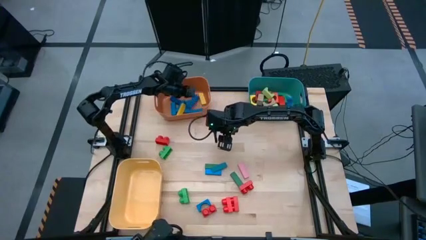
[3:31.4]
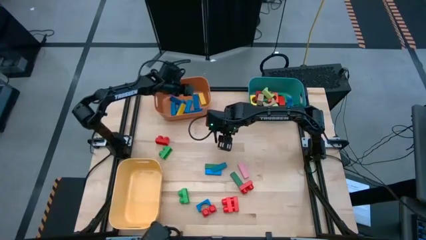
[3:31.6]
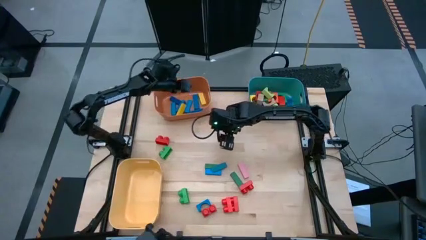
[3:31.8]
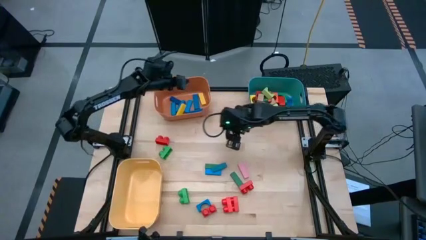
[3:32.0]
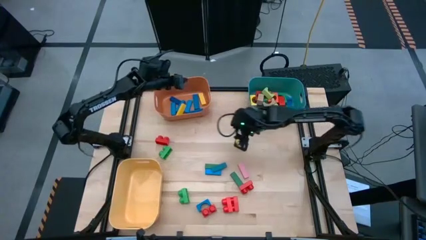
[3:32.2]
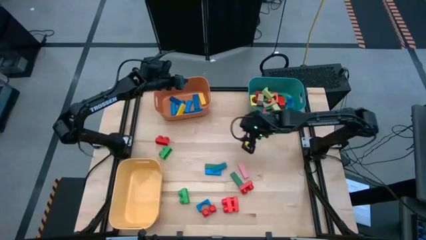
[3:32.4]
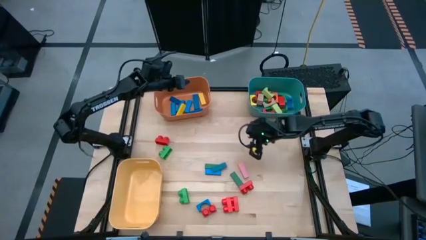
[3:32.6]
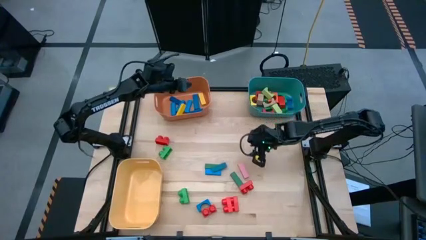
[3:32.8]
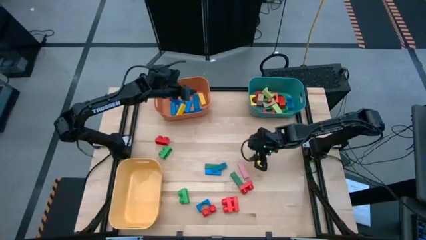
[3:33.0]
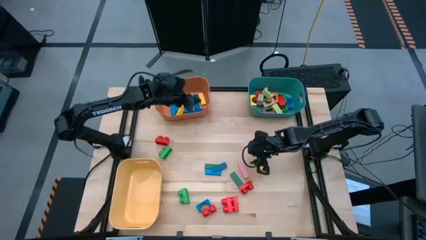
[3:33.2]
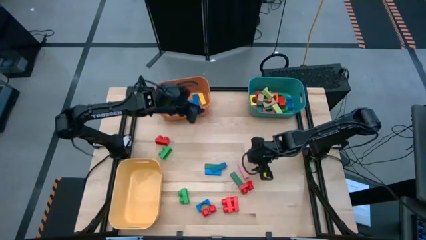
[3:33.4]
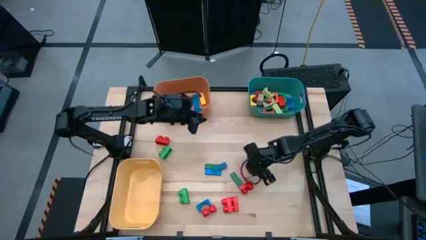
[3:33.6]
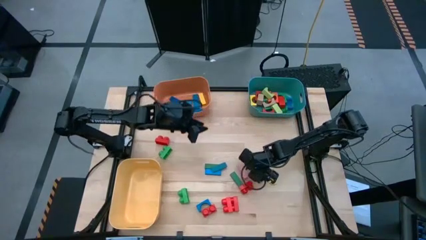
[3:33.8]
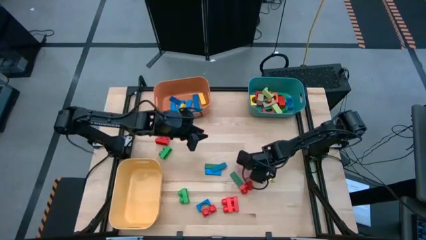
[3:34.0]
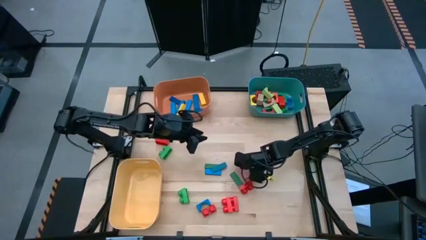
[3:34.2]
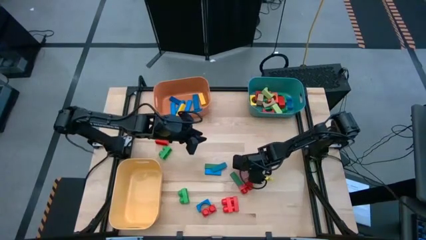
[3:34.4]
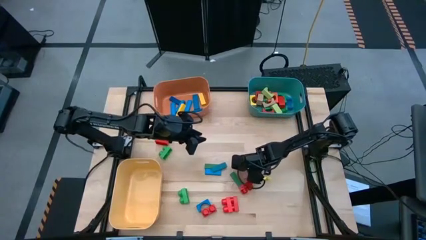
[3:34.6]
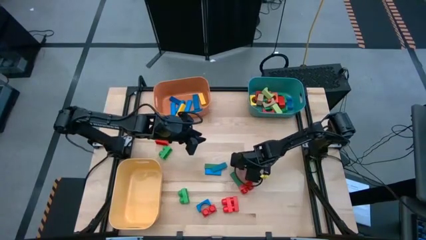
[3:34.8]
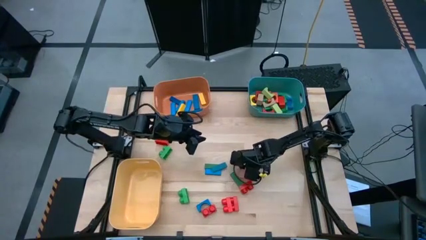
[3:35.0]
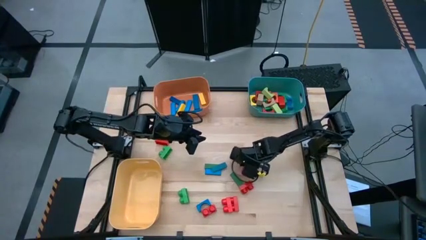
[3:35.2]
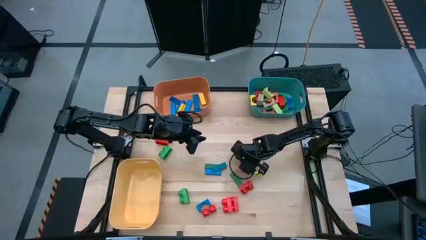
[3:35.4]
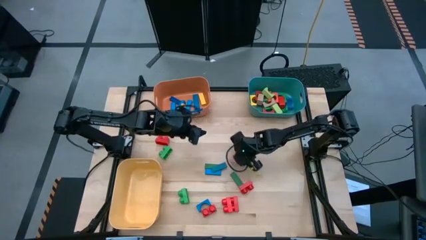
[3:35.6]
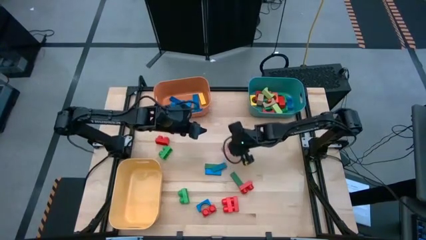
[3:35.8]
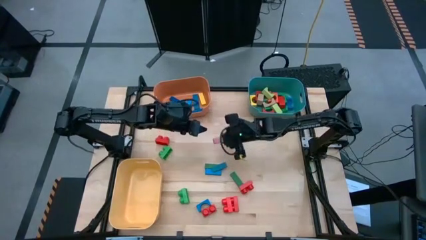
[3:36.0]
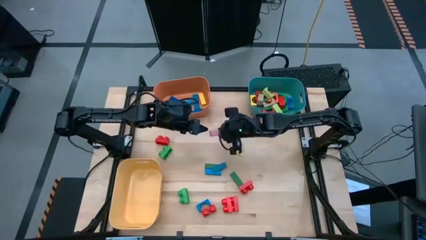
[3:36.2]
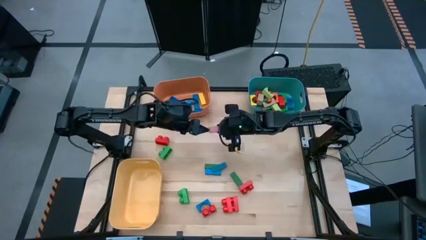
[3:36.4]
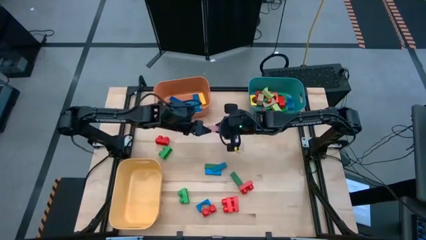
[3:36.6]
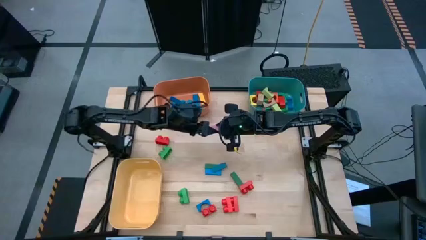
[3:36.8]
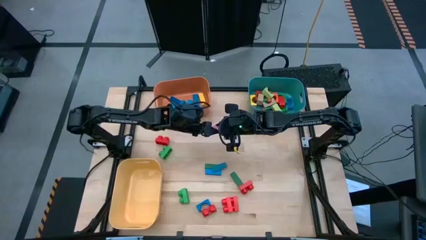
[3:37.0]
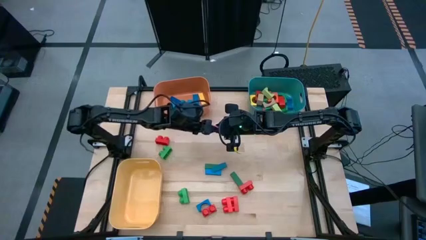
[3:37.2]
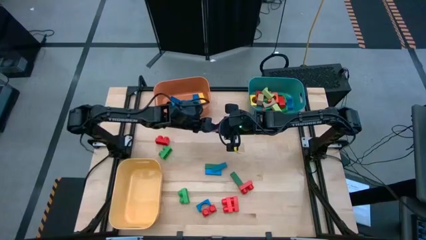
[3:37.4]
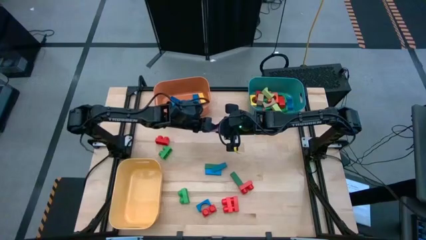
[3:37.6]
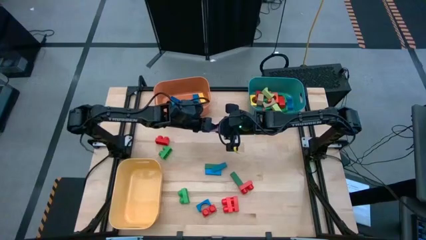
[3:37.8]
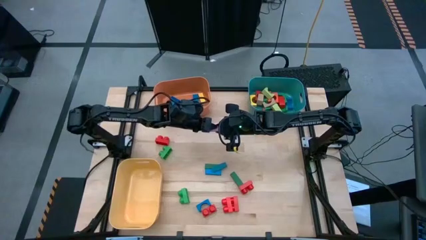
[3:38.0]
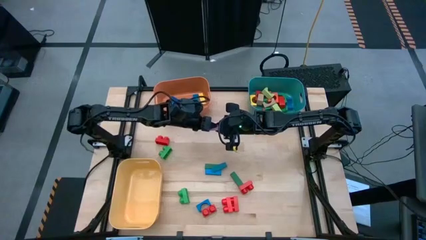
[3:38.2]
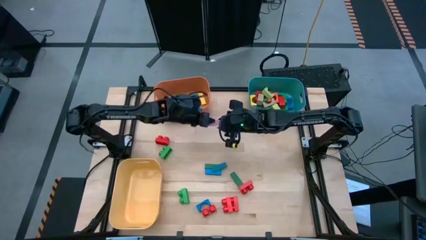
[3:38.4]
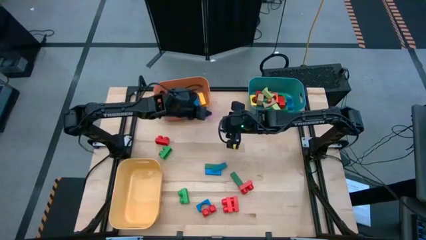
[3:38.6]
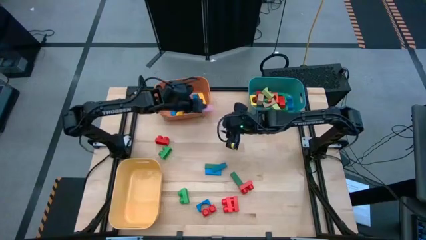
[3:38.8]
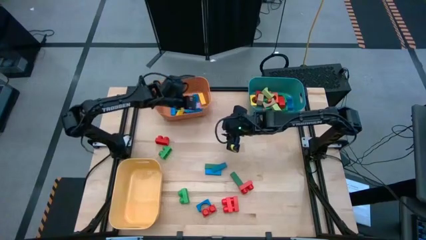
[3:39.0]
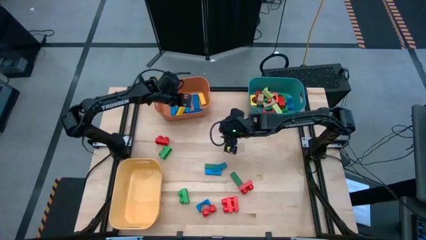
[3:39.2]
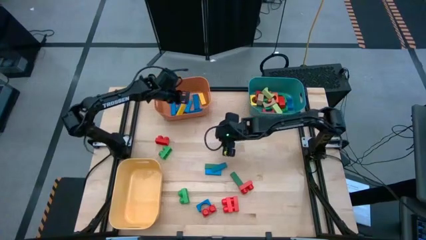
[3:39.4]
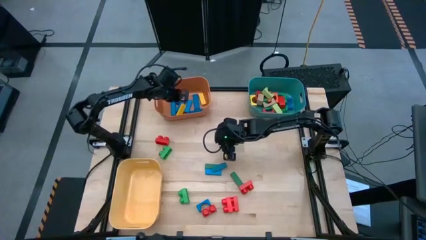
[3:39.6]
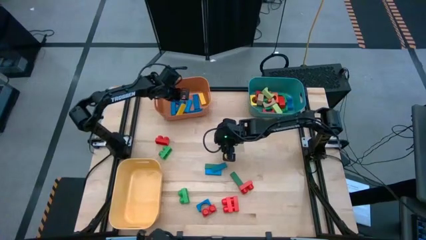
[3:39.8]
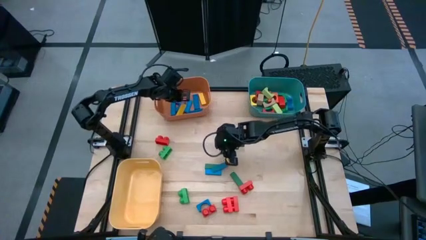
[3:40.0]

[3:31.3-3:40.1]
Task: Sort blocks by size
Put the pink rectangular block into the orange bin

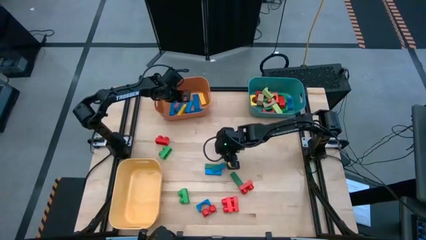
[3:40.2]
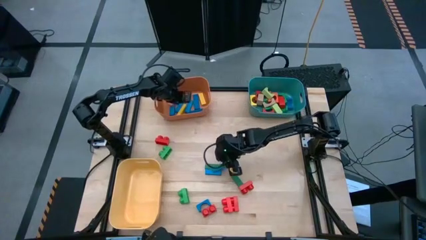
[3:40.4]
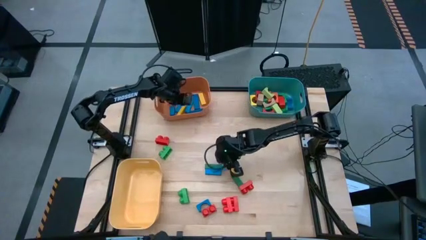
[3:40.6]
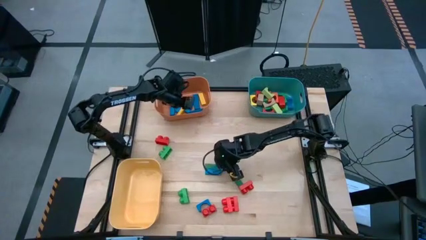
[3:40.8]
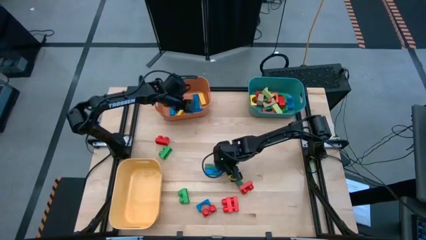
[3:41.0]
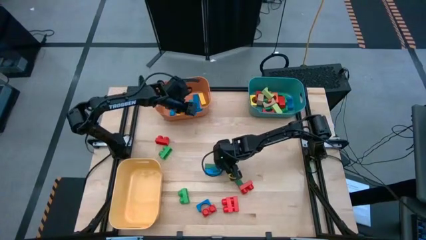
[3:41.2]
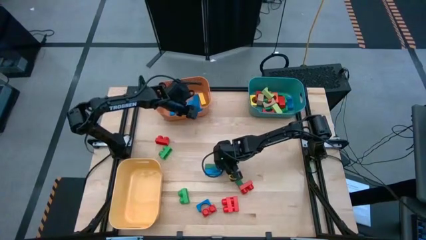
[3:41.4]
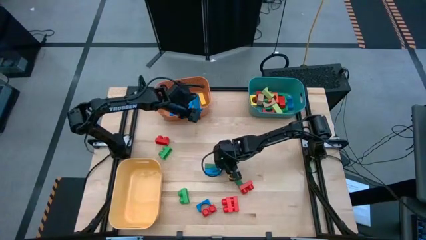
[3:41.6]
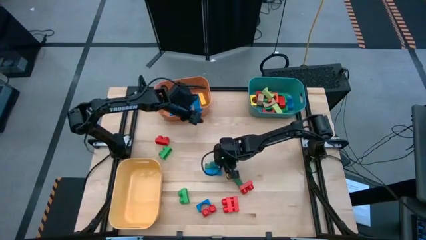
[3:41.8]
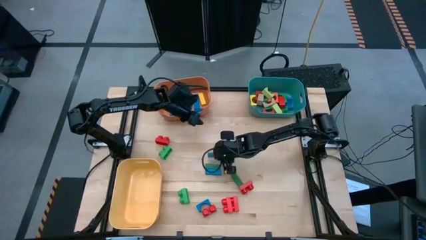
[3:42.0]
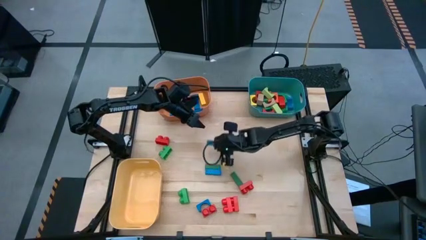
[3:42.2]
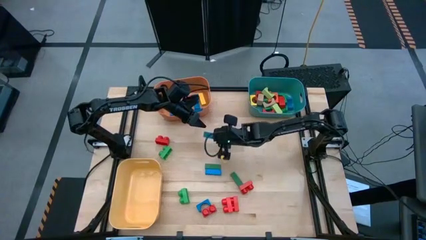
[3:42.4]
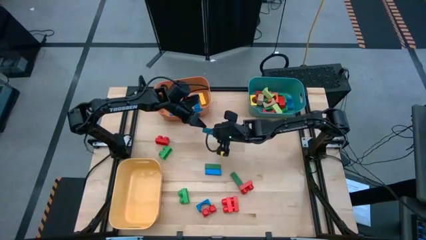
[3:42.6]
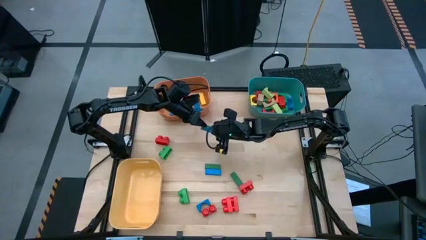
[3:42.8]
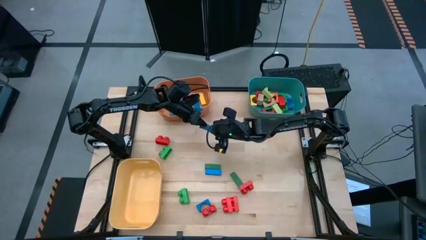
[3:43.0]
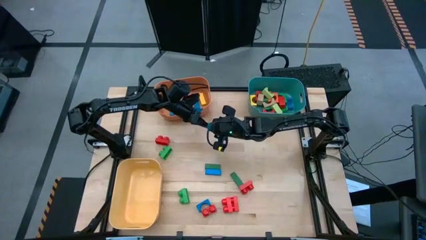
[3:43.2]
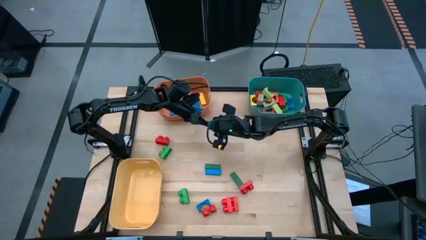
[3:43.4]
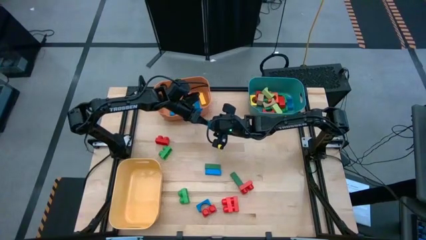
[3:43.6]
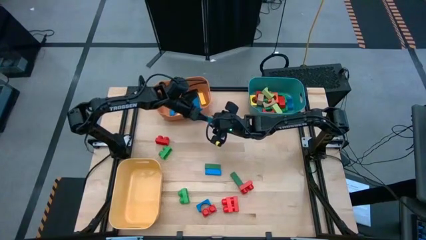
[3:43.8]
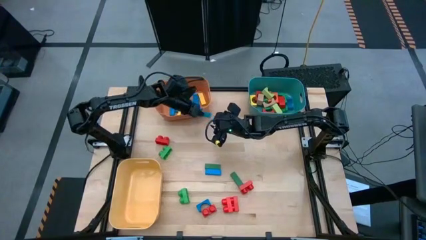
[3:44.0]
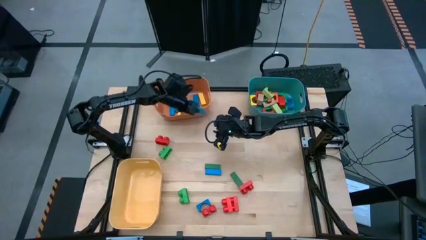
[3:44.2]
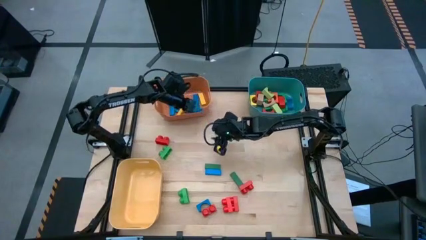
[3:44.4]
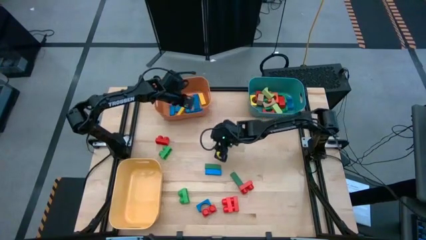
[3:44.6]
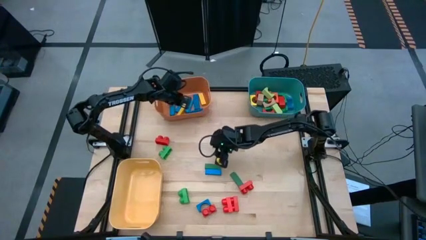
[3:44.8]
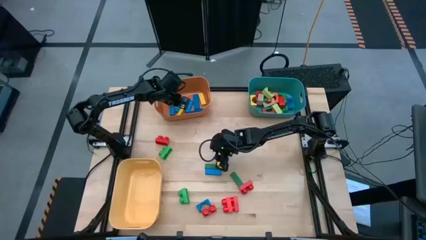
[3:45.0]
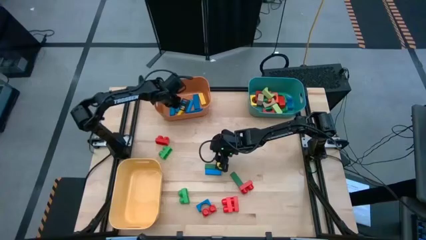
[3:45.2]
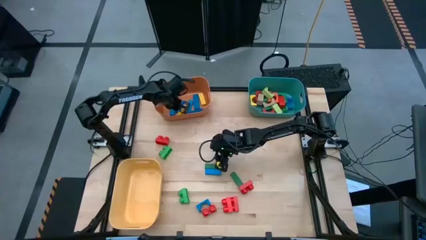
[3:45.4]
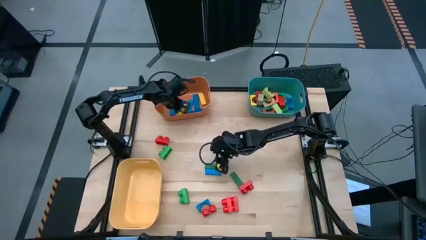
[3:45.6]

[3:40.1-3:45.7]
Put the blue rectangular block into the orange bin

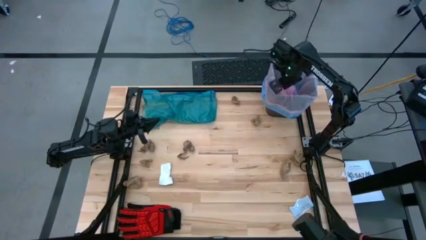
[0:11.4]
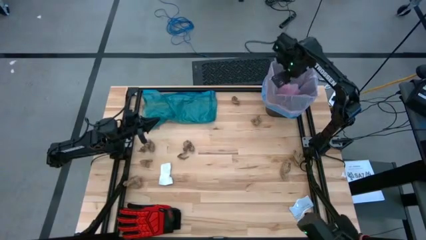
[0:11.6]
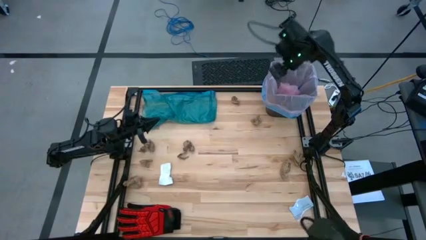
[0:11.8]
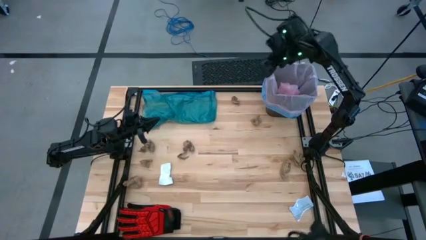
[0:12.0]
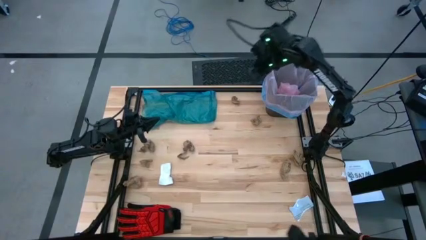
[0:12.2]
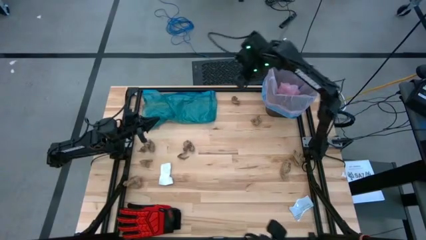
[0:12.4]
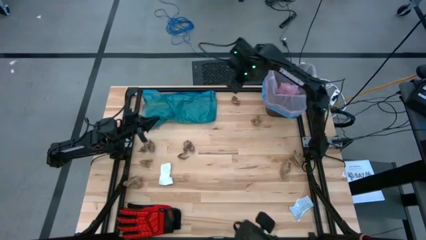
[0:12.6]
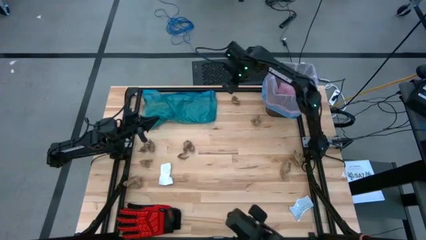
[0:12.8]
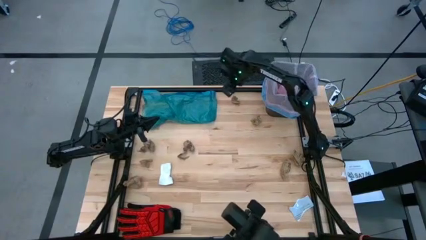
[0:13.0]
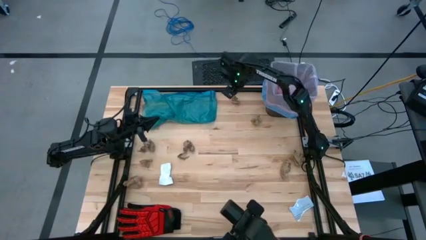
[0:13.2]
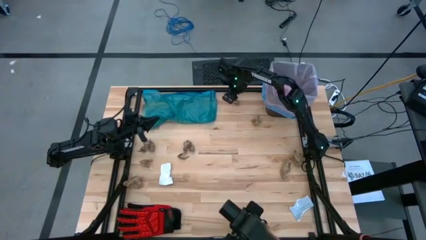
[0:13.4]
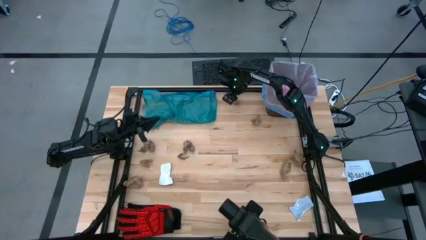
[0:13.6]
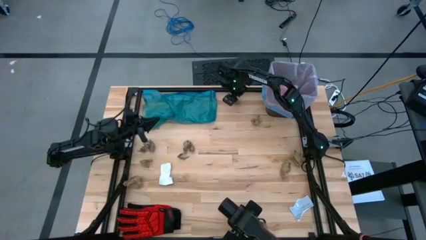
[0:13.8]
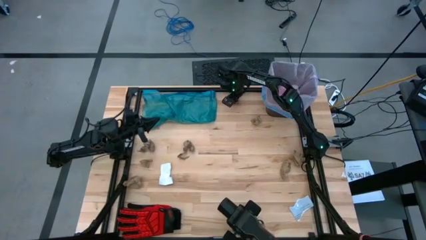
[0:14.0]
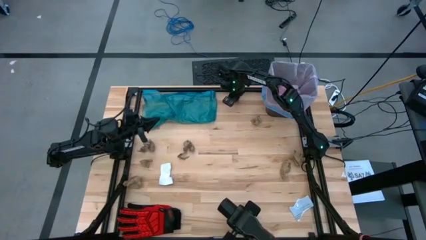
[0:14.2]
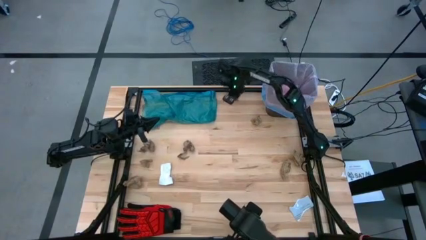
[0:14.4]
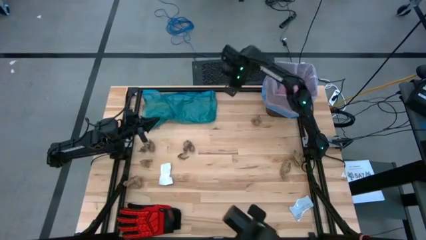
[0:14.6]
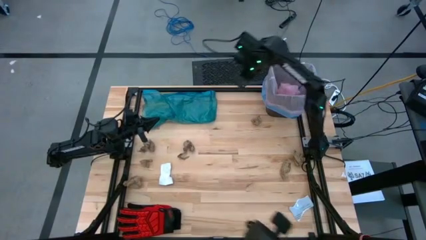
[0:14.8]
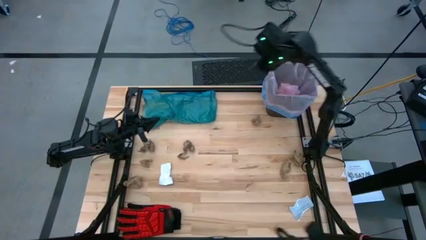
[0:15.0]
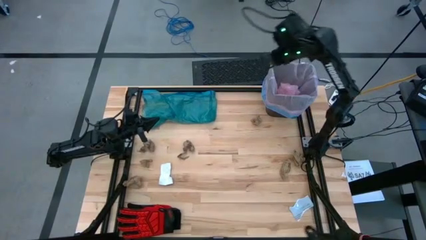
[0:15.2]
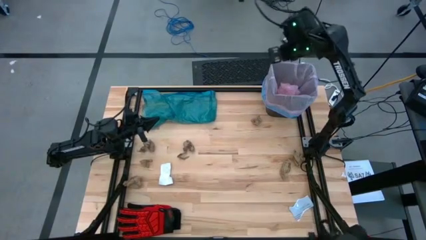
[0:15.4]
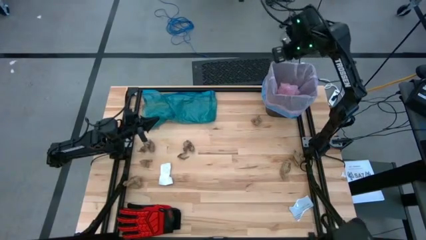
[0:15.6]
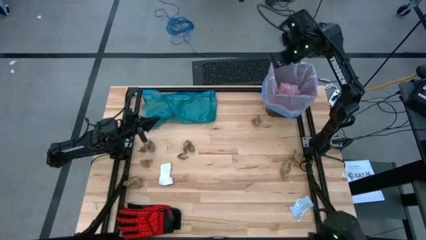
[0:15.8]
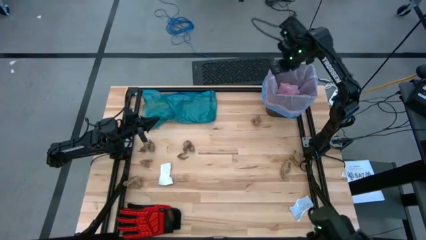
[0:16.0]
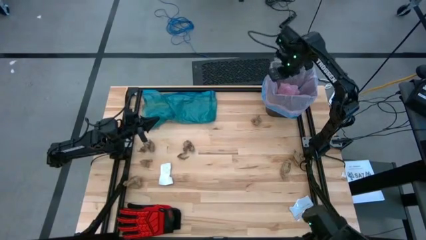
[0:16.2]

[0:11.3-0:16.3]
Task: place trash/remove bag and relplace
Put the brown paper into the black trash bin
